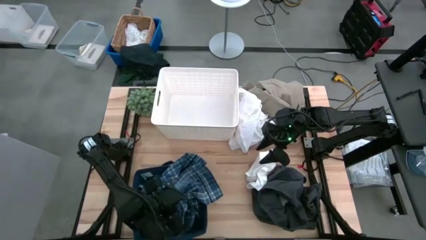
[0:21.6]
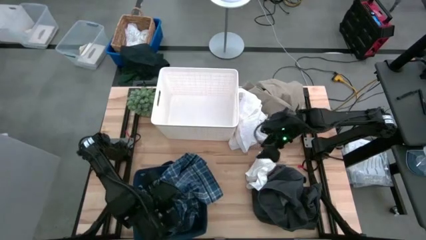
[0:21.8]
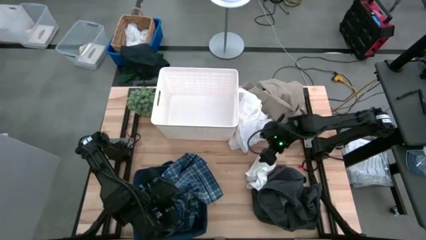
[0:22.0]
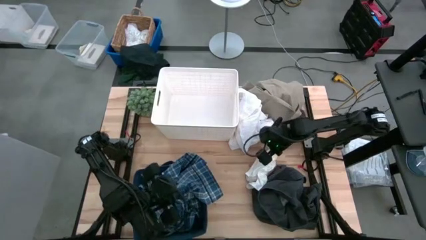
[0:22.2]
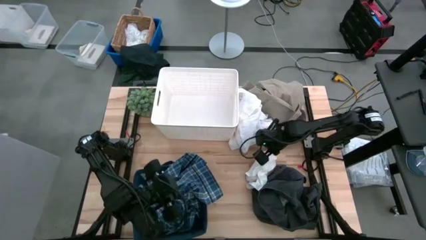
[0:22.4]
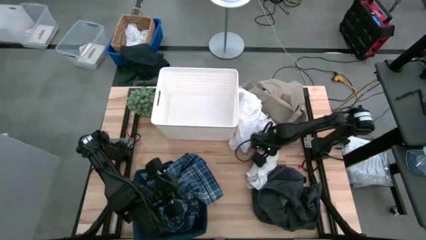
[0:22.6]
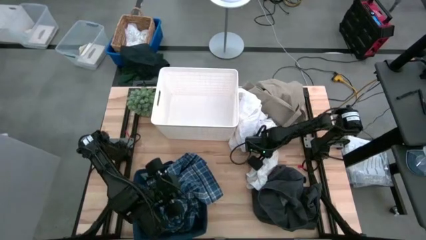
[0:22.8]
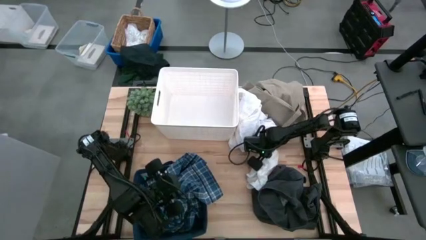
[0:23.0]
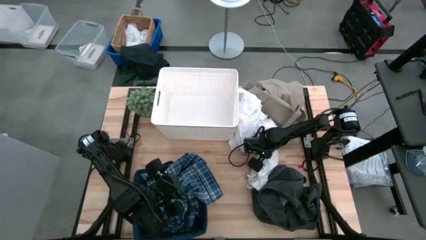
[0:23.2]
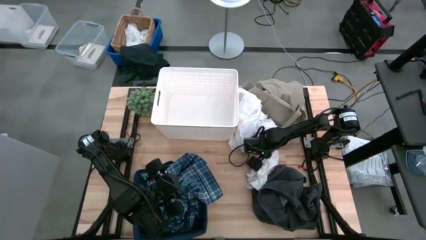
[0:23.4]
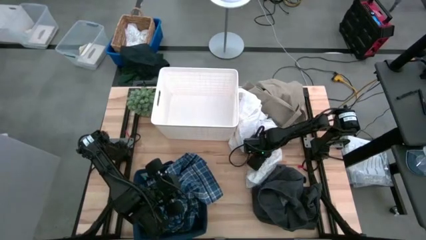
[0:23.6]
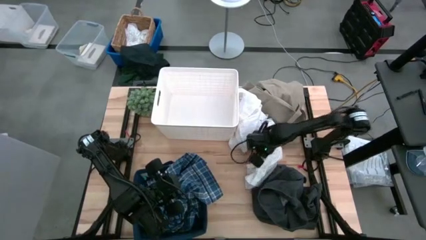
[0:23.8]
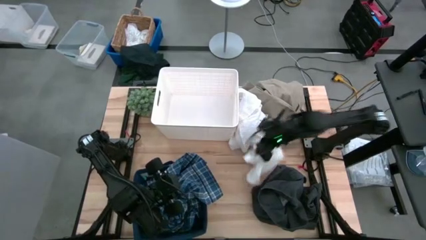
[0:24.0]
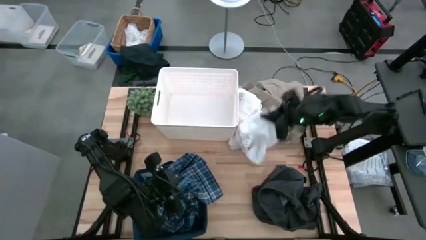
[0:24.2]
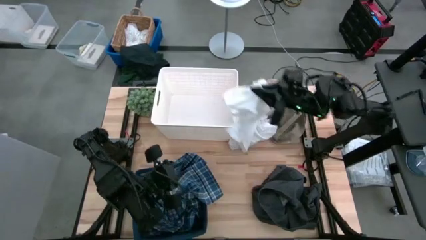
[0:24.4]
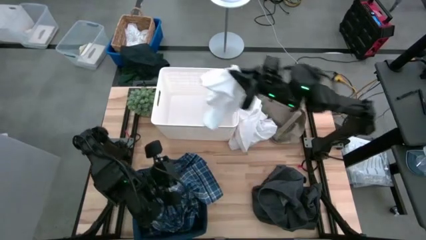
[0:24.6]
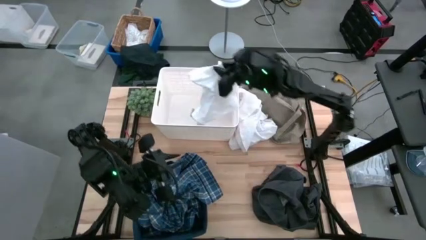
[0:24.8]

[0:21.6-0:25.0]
Task: Sort clothes
Put the white shorts into the white laundry organizer

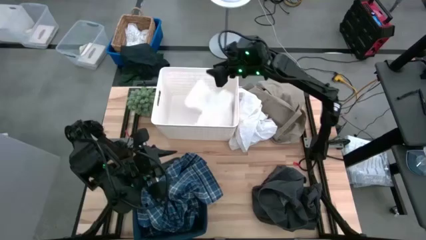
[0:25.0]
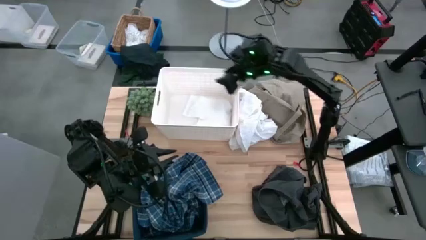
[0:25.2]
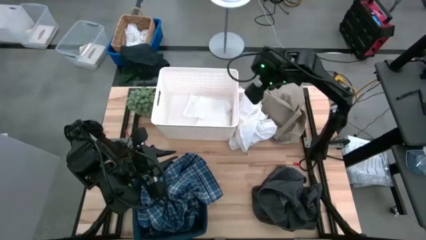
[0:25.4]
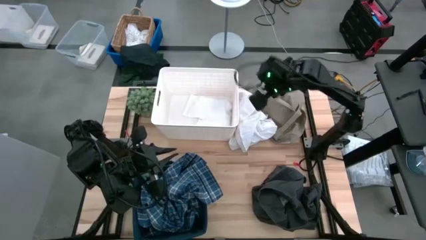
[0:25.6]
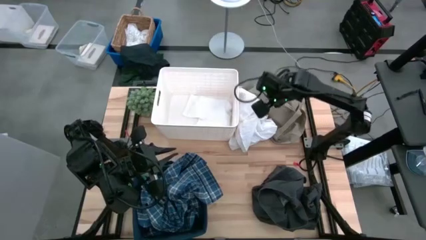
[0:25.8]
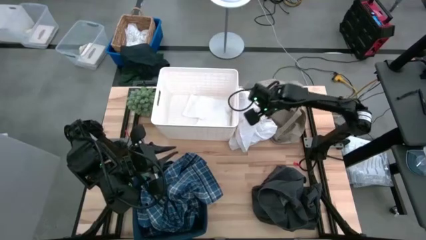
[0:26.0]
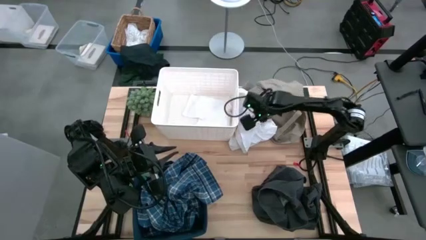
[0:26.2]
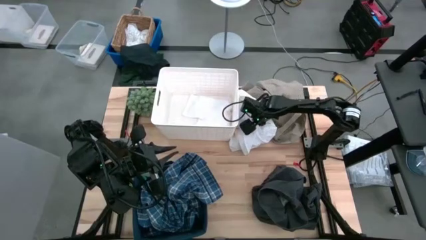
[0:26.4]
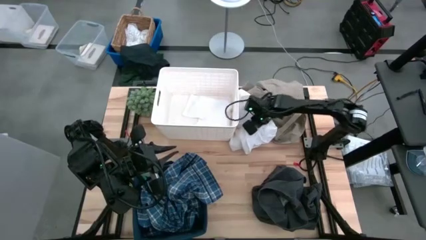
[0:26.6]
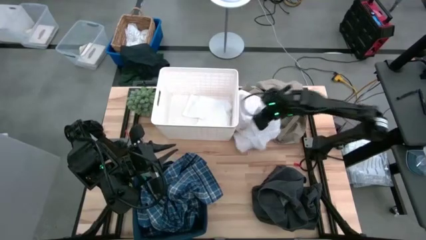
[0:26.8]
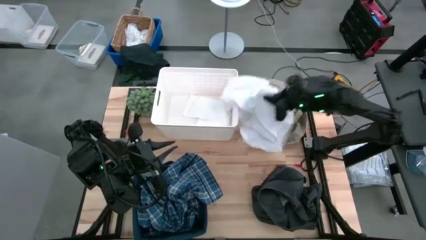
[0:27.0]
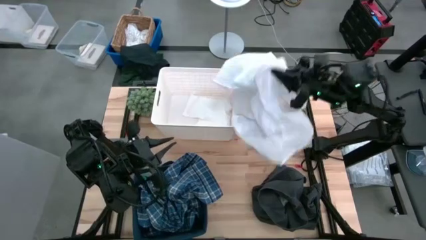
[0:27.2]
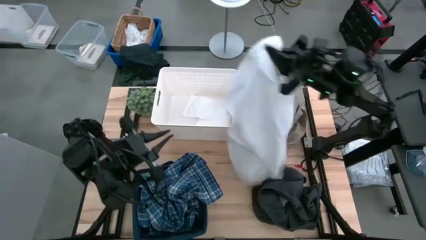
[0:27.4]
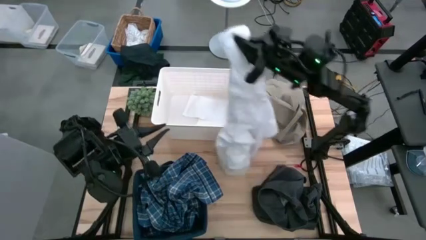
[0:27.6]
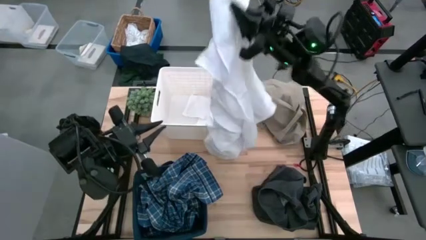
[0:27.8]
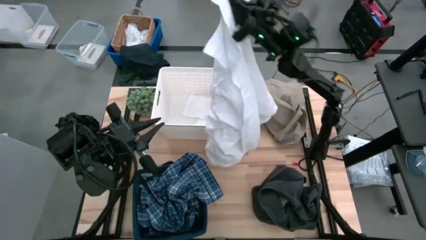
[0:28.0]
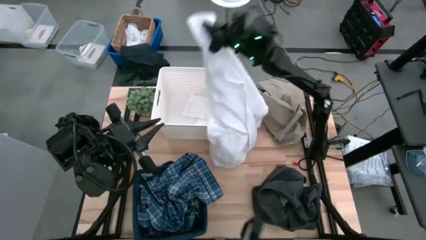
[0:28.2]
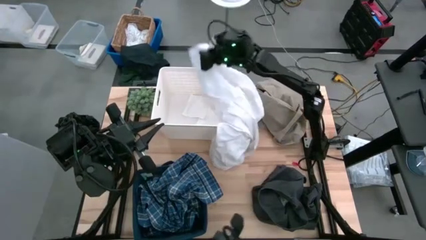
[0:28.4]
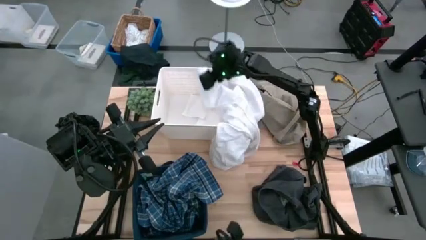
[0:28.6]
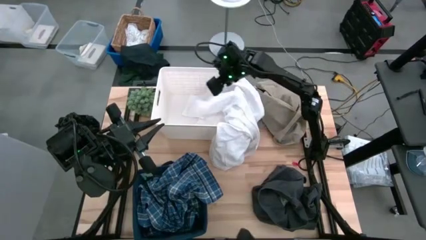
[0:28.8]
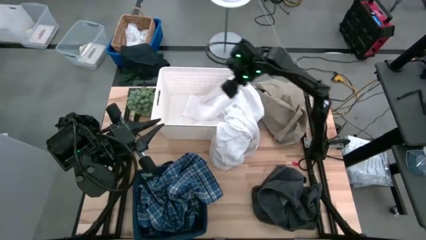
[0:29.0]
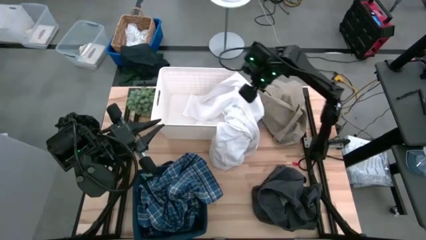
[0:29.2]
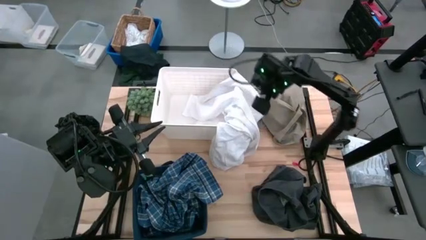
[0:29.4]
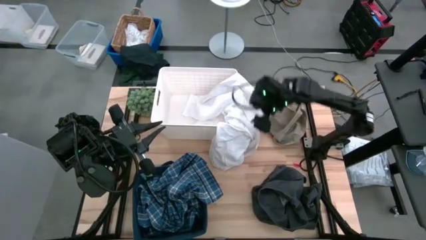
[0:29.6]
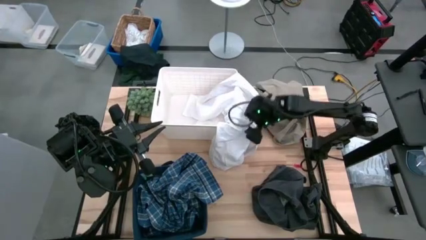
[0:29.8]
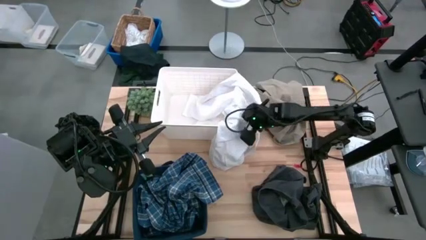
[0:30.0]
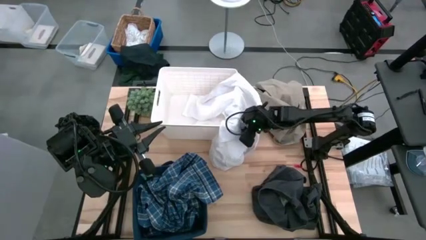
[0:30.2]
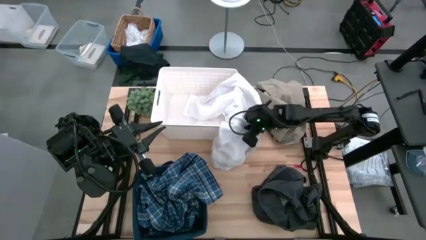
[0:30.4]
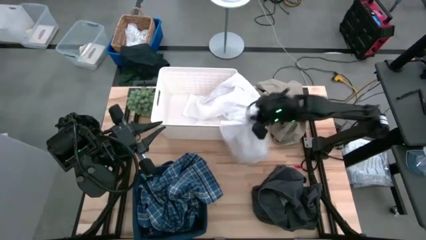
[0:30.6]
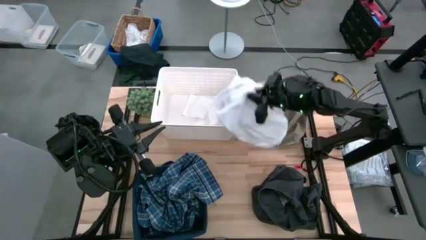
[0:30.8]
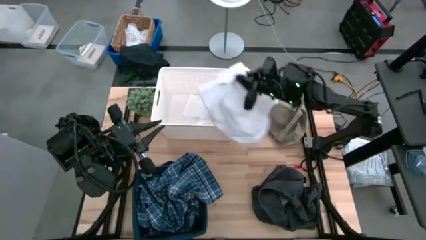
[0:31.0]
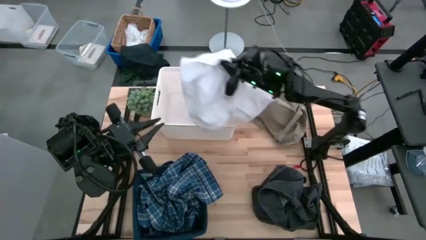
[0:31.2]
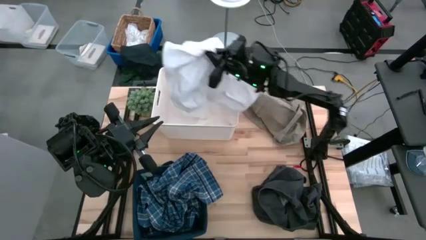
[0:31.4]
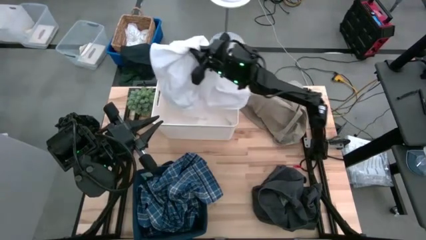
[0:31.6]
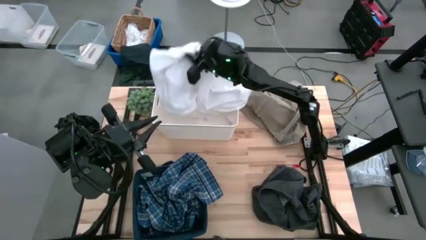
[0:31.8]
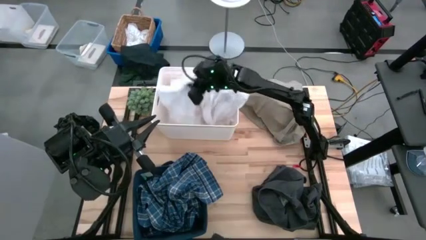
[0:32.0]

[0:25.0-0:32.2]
Put the white cloth into the white laundry organizer

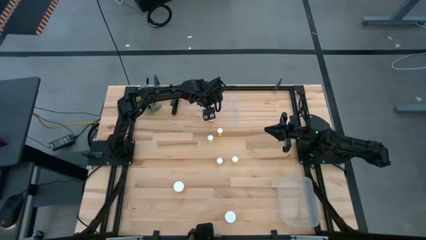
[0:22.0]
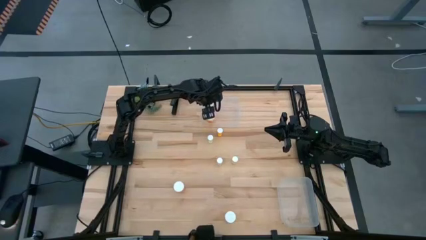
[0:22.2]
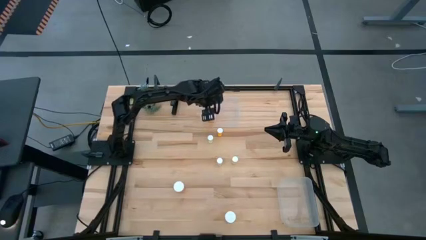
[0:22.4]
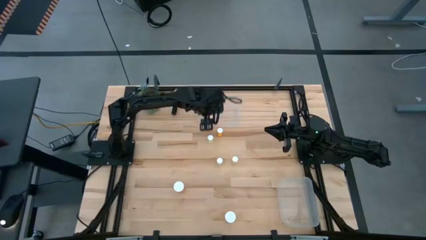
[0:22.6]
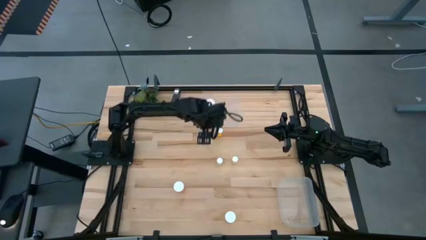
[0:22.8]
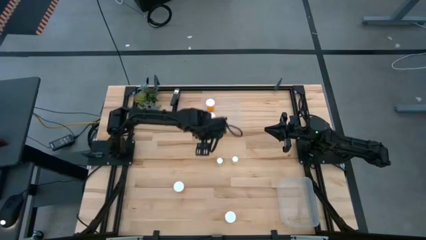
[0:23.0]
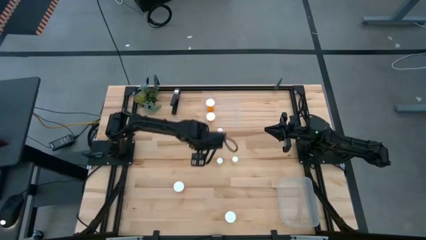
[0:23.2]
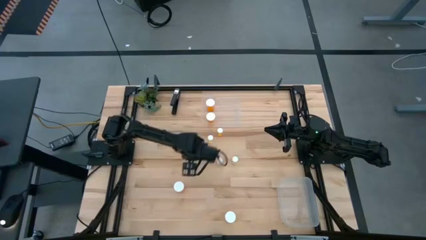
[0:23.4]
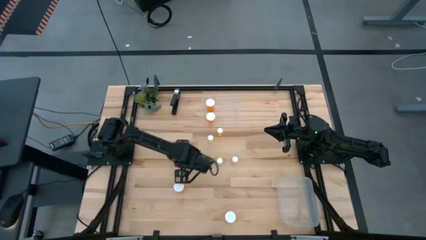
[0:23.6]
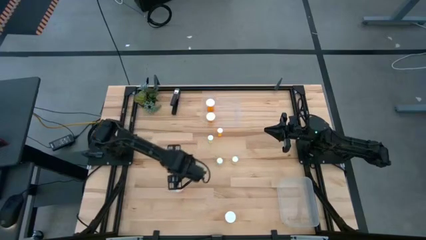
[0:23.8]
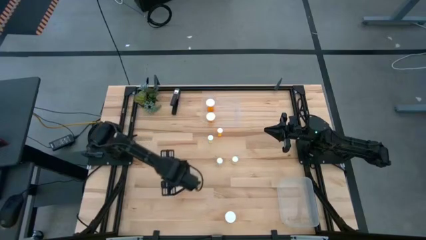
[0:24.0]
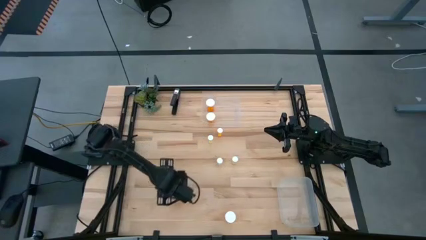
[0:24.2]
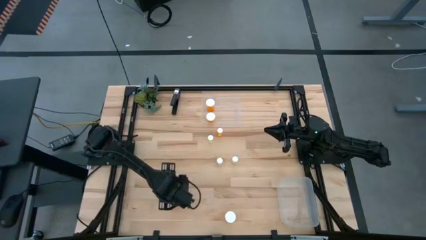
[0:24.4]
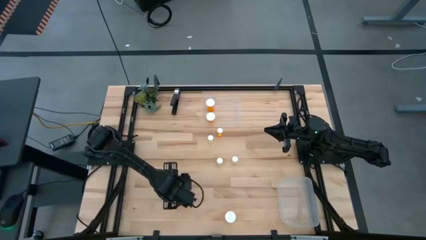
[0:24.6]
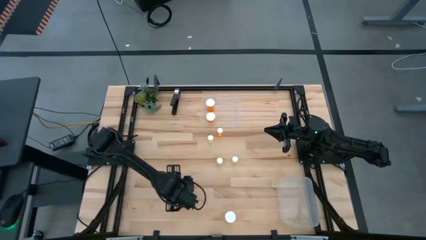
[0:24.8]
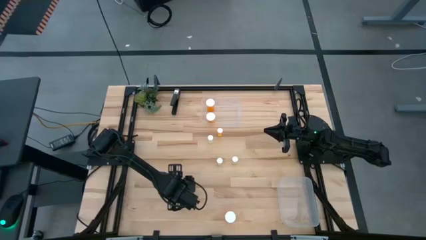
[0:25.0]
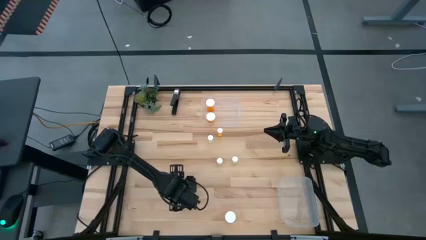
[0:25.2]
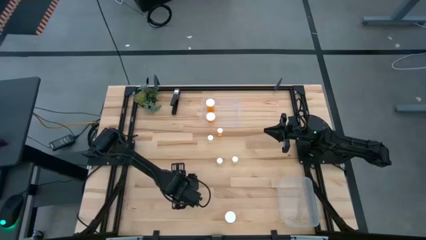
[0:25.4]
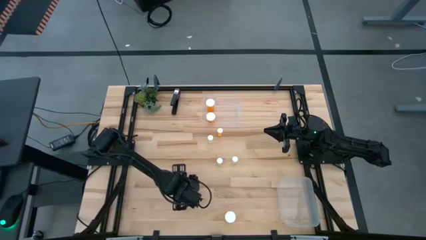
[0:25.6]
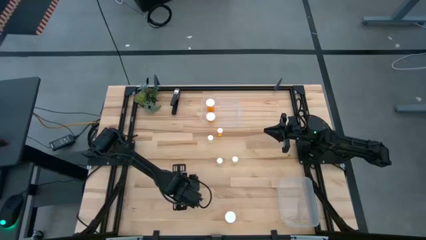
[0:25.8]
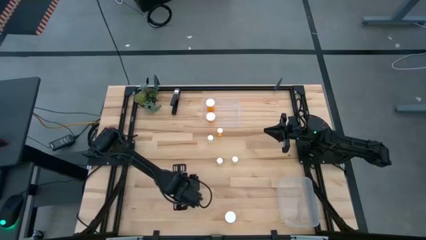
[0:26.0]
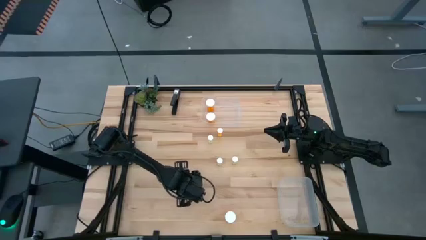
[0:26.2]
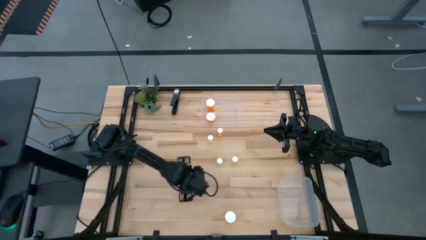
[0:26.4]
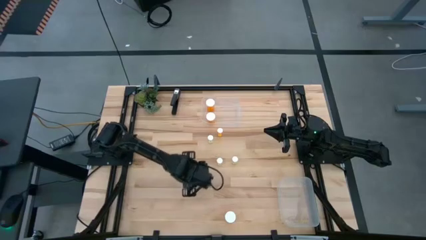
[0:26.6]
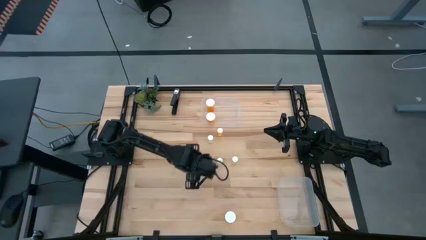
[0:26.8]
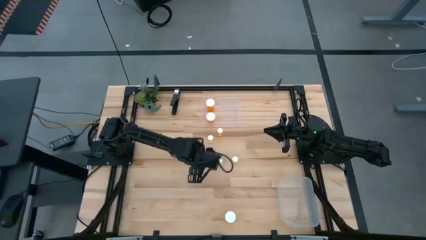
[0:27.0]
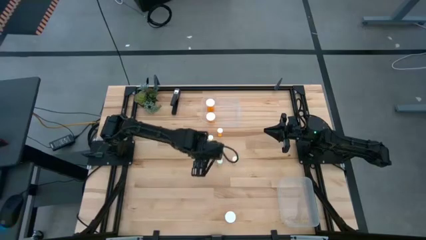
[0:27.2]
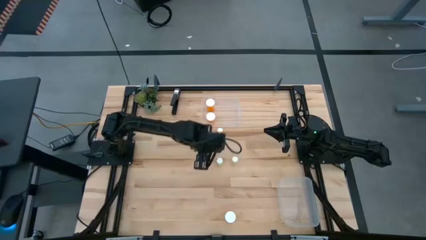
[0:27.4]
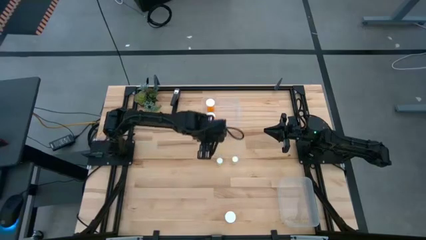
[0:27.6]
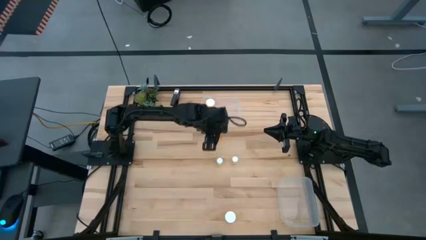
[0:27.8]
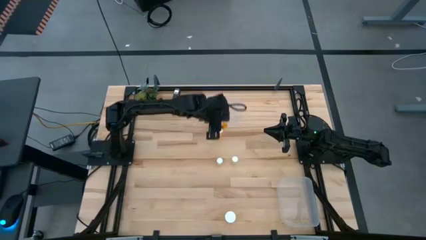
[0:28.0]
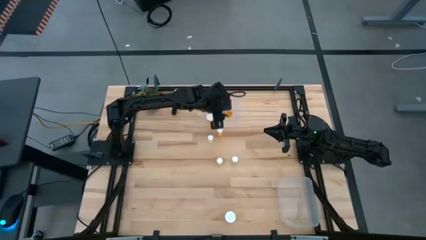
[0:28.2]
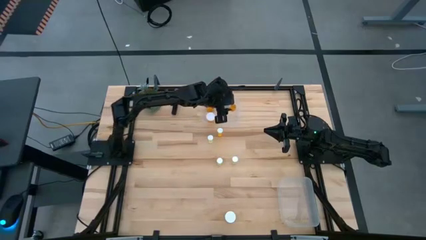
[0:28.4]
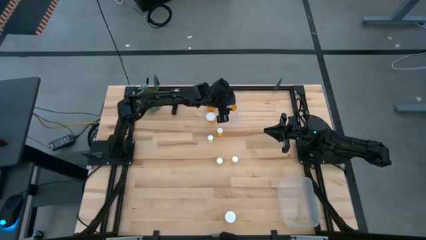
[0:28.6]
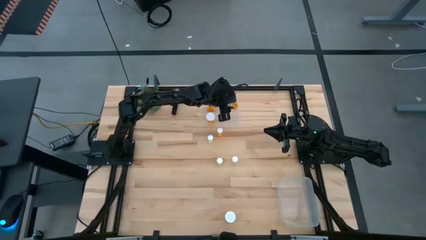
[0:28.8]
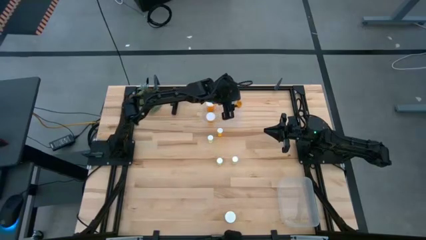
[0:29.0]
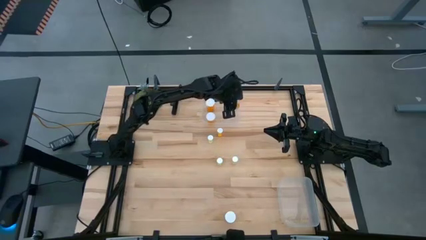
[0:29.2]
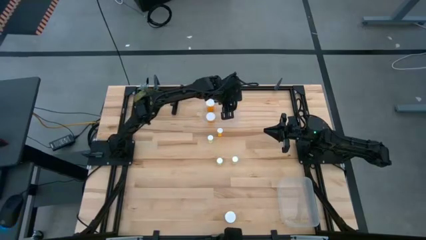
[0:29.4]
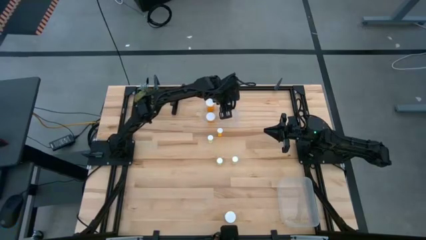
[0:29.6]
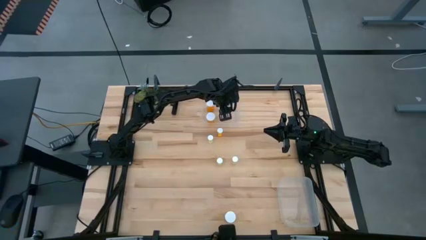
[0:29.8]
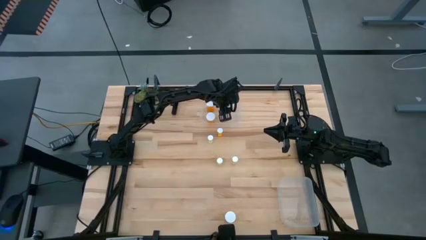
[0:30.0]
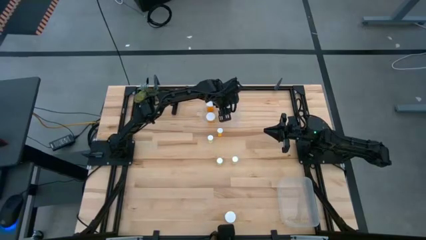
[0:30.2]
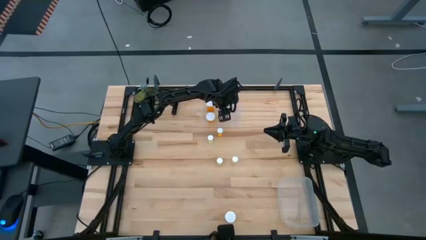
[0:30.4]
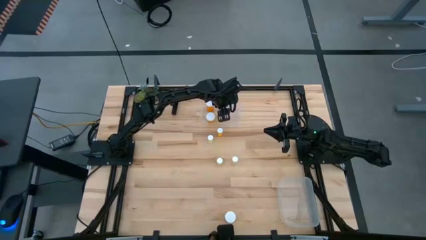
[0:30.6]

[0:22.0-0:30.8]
Task: Pick and place medicine bottles into bin by pill shape (circle, oval)
Put the orange capsule bottle into the top transparent bin
